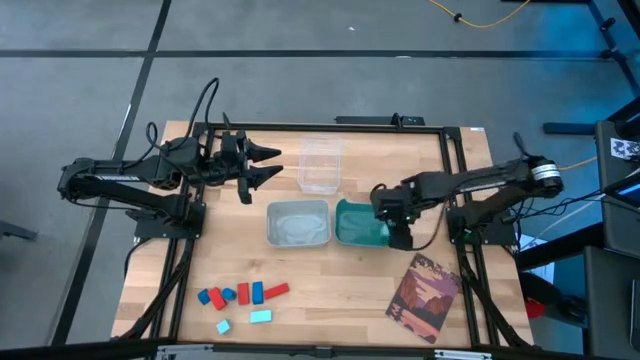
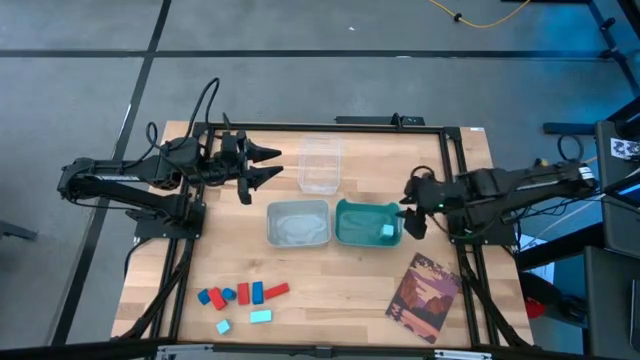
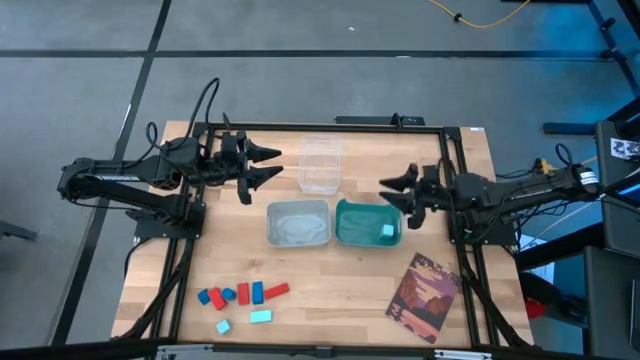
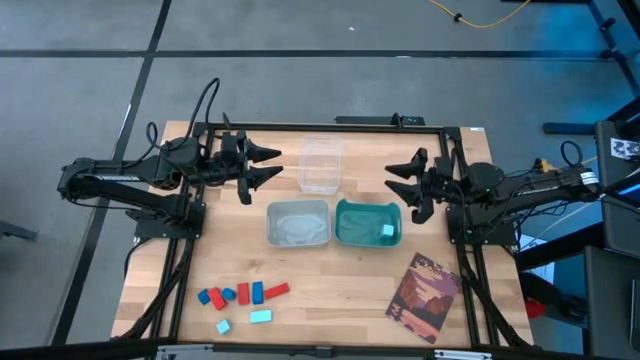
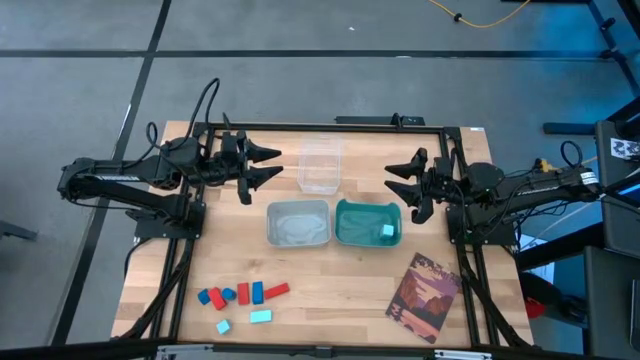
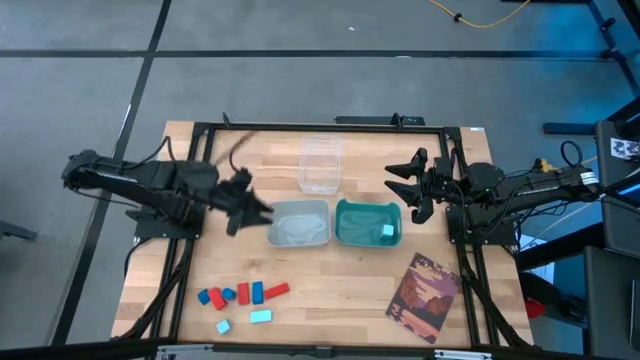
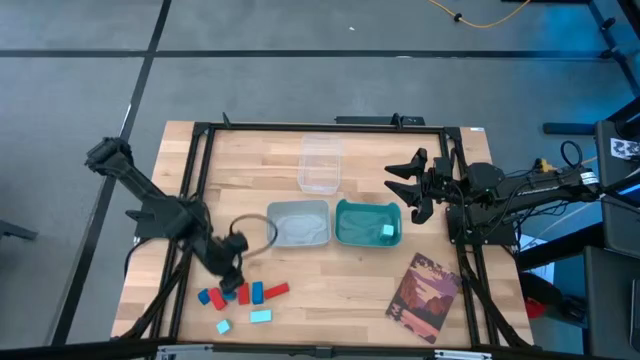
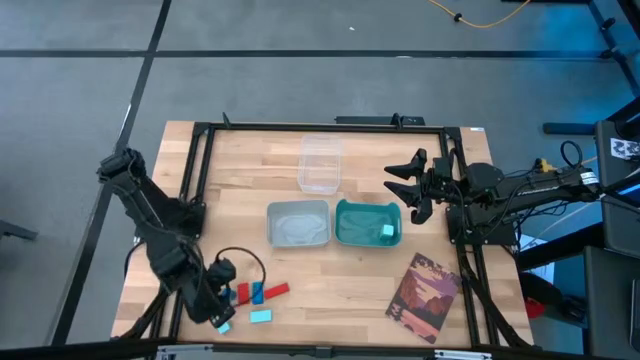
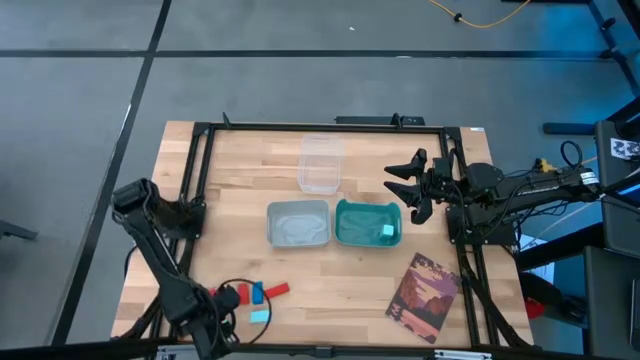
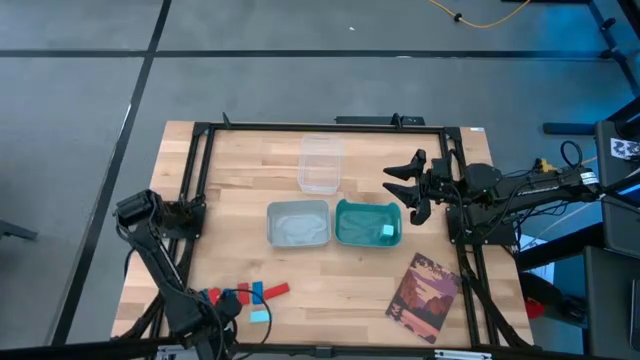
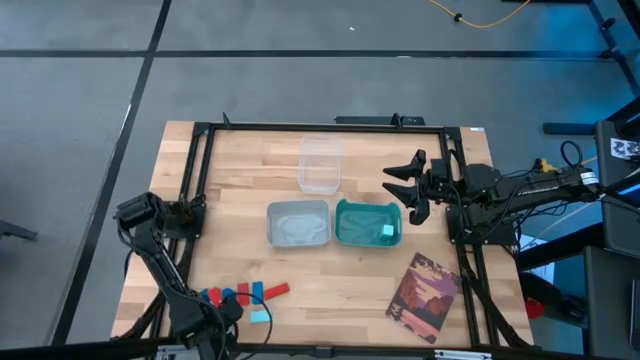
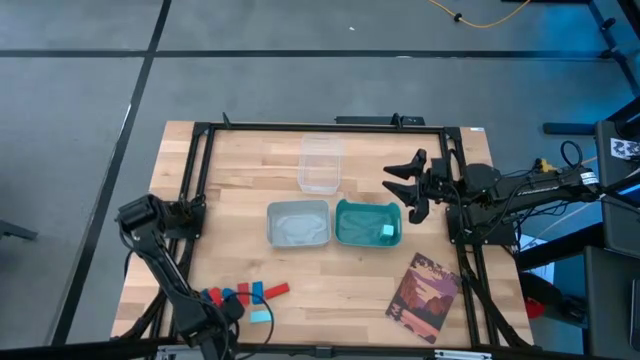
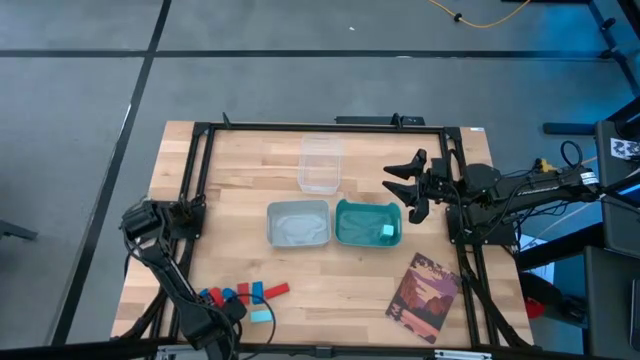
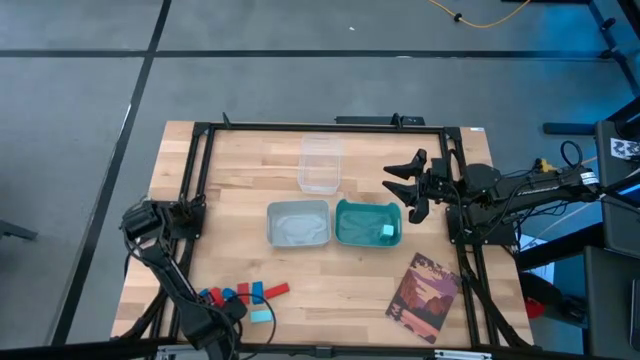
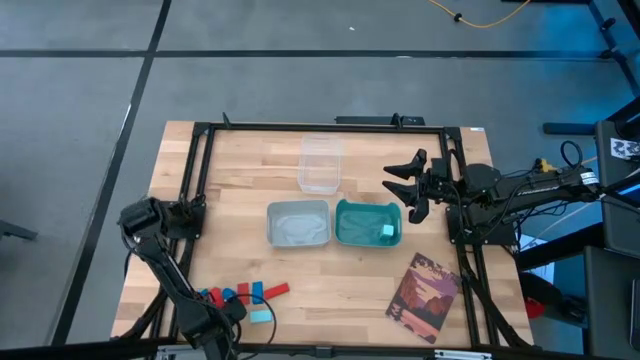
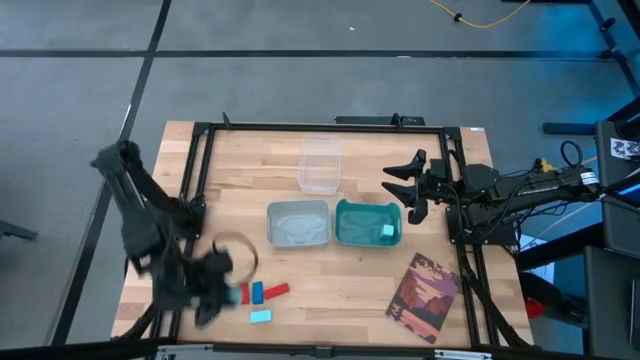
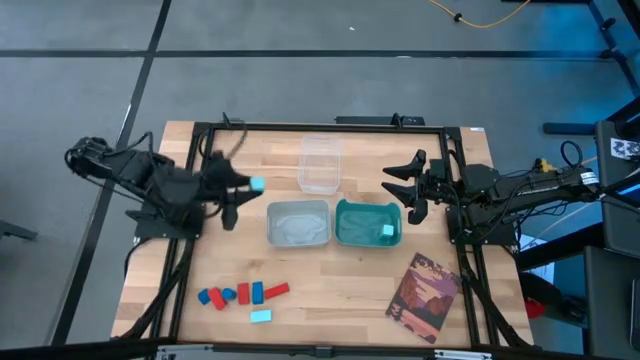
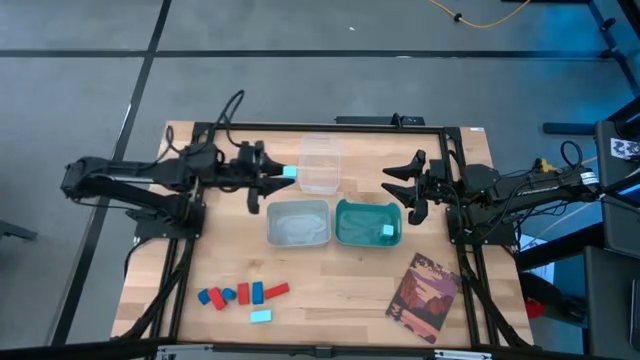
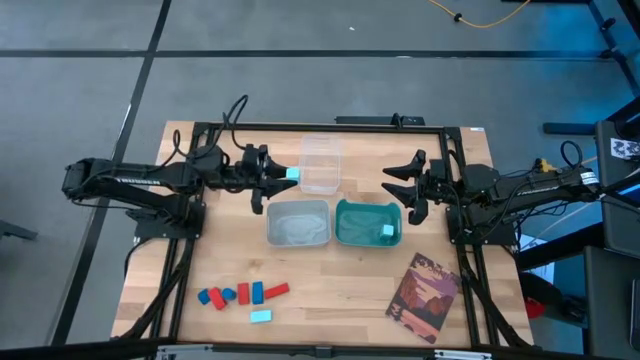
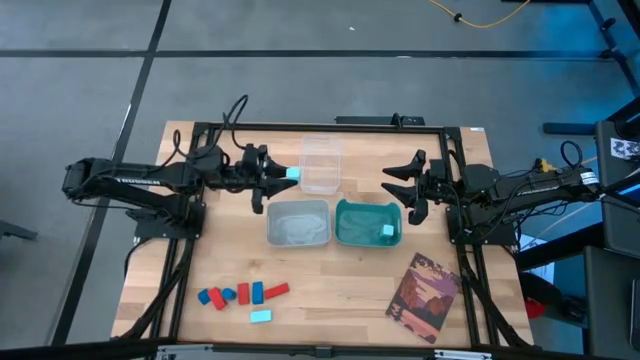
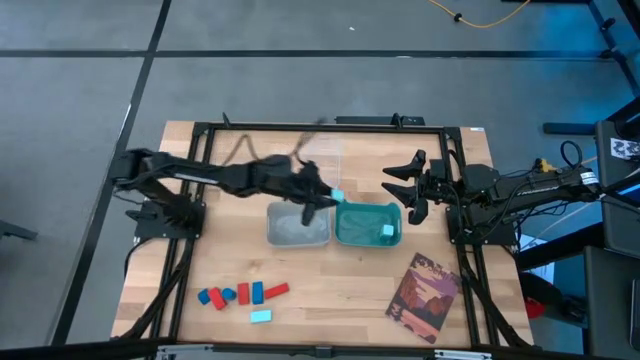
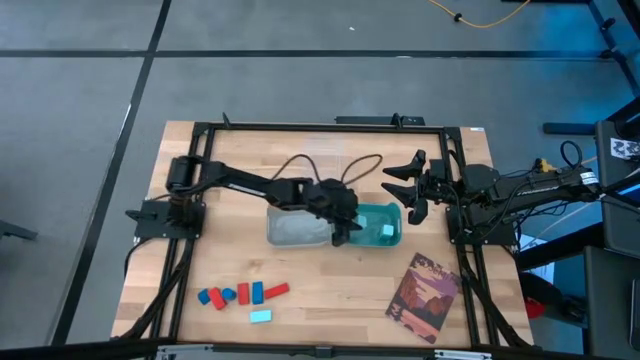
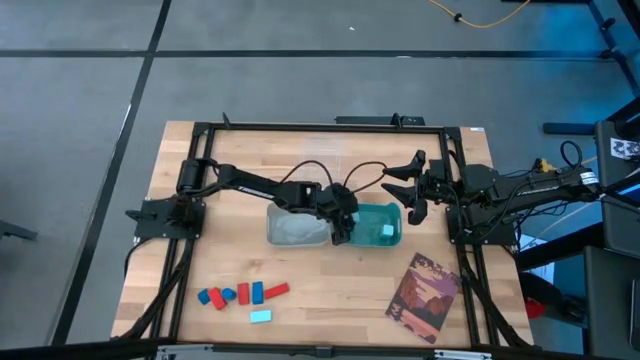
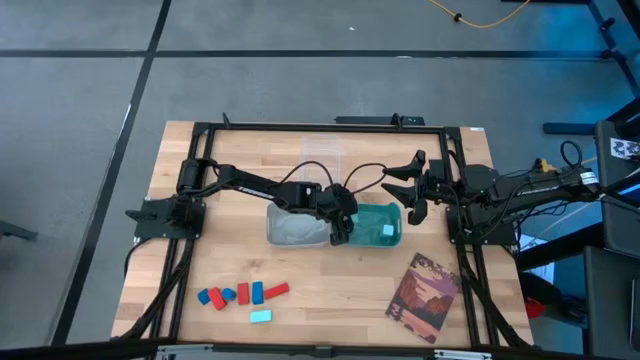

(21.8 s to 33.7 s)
Task: Sort & place blocks by color
Put the left light blue block into the green bin

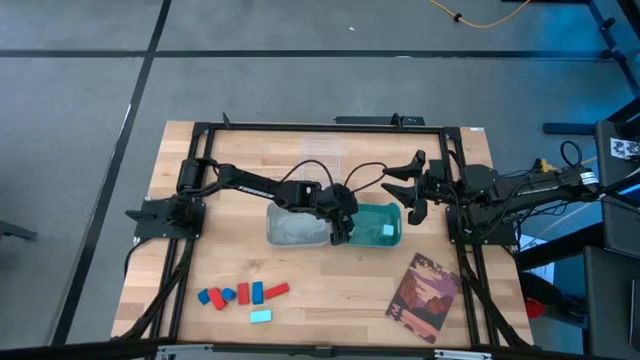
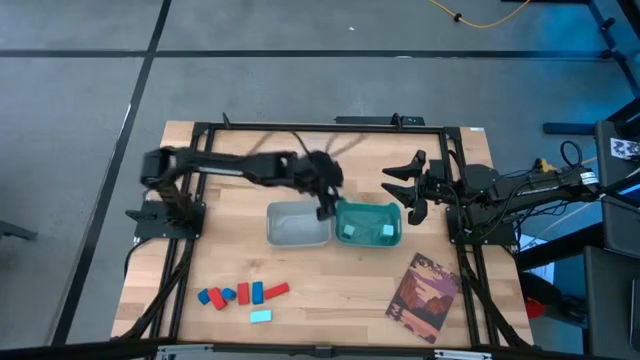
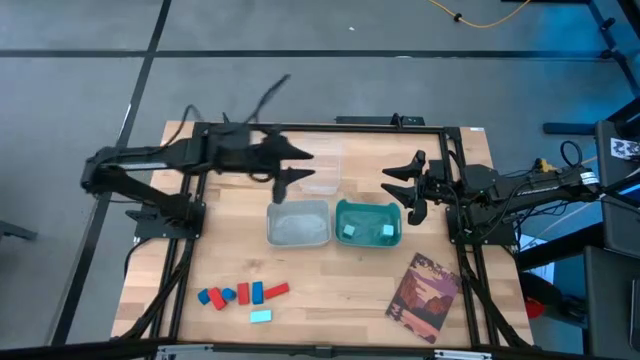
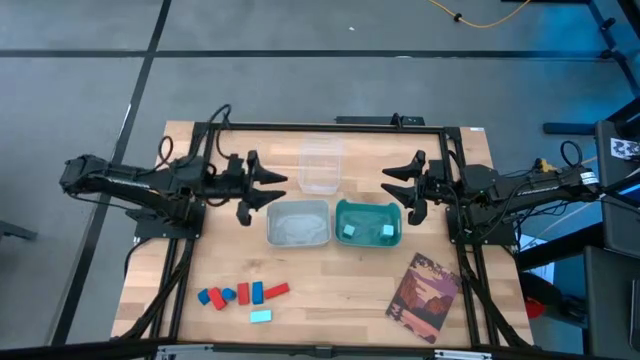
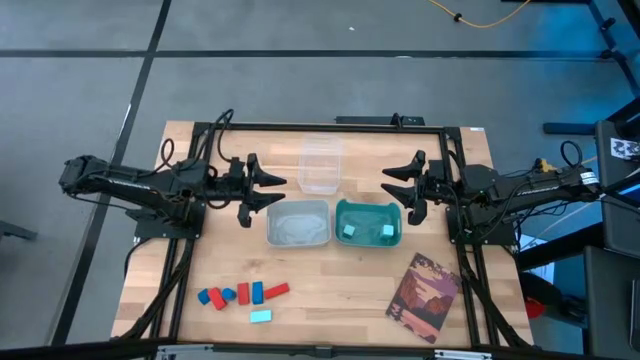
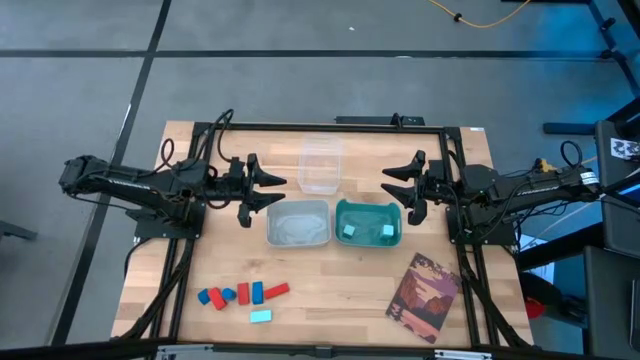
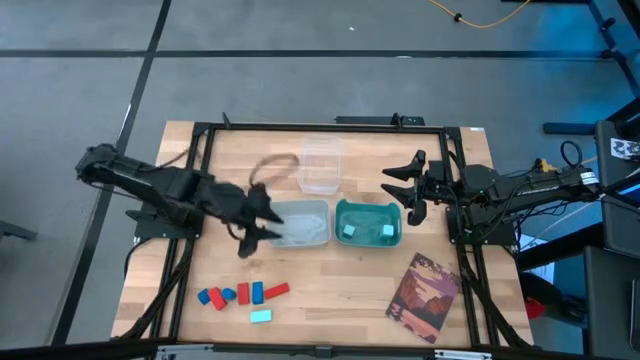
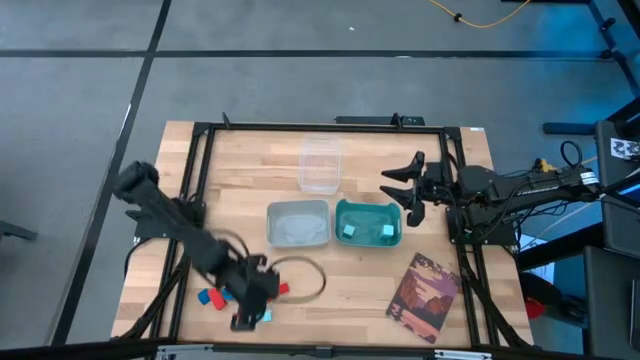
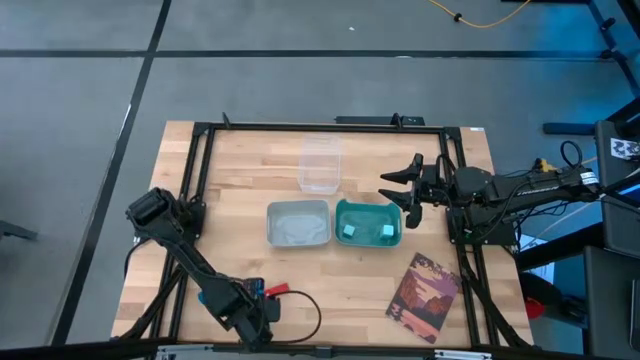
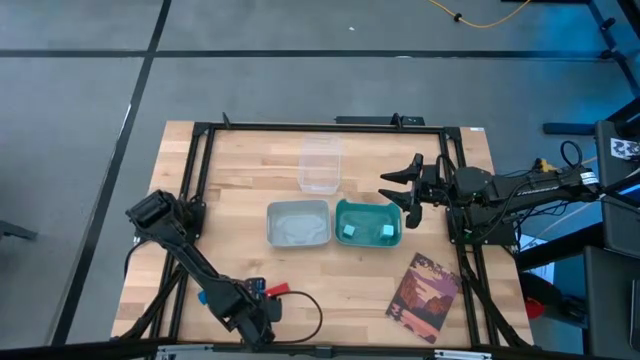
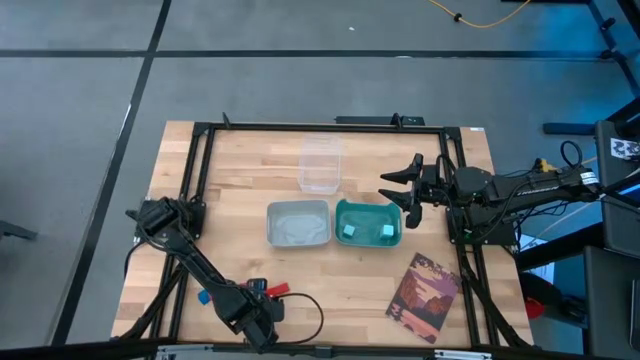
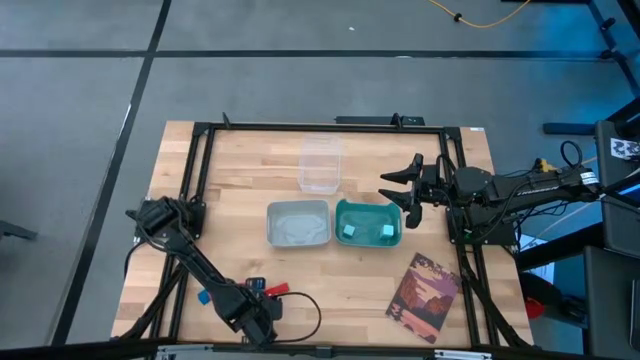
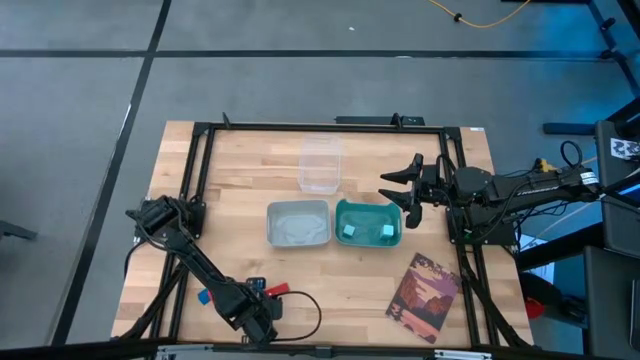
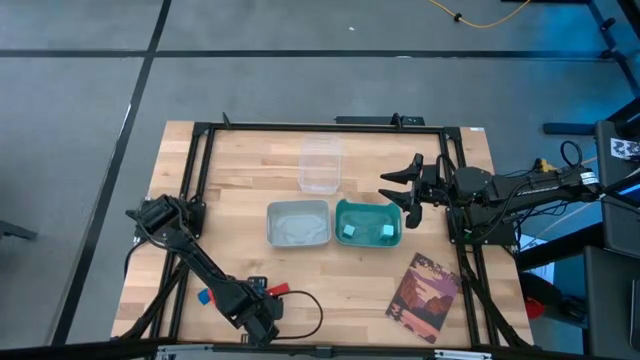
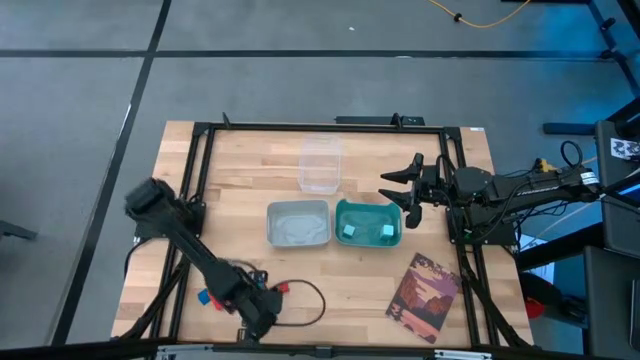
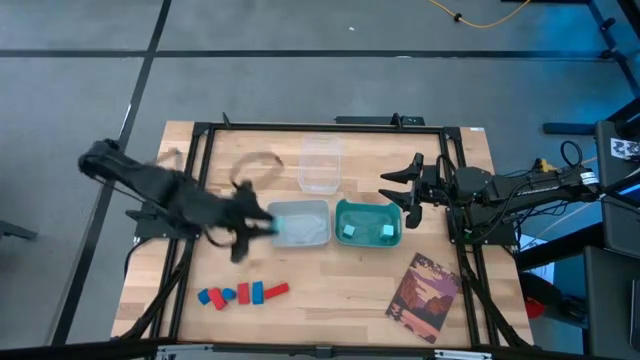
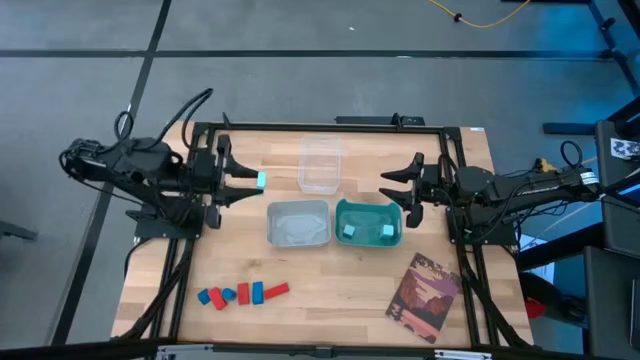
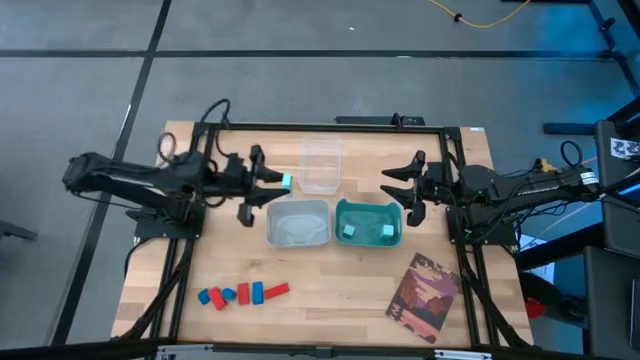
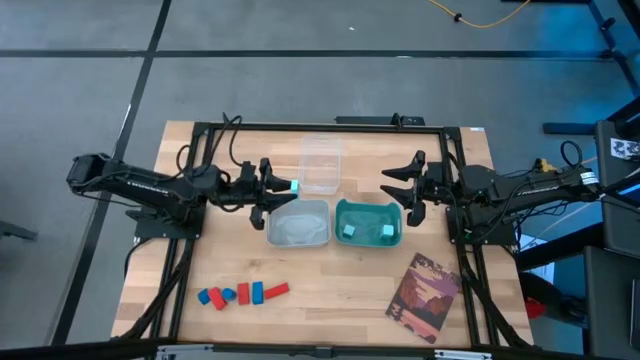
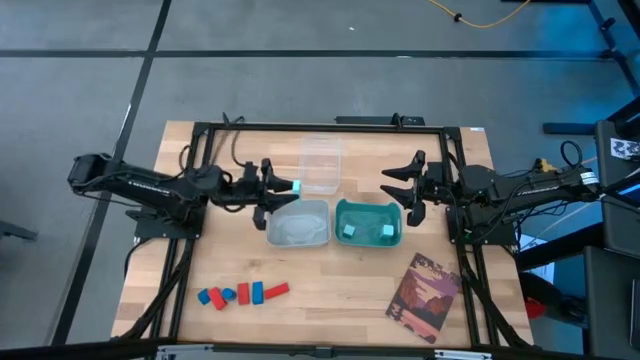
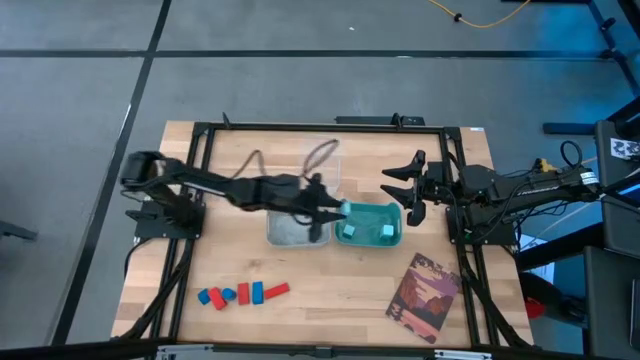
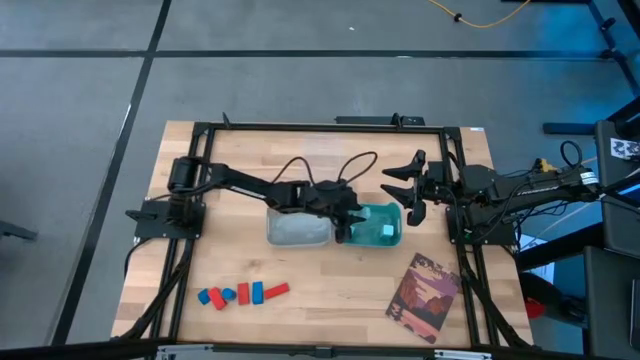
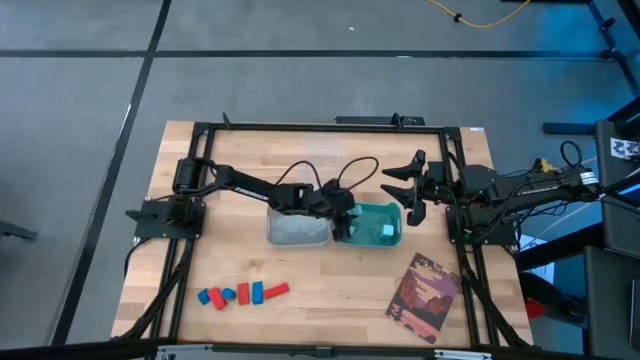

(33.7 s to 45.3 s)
Put the light blue block into the green bin
